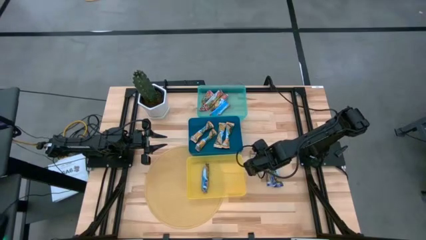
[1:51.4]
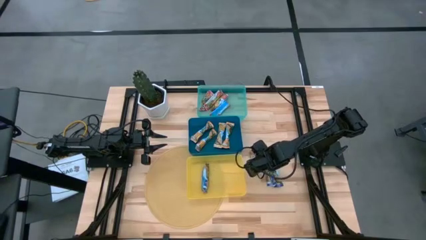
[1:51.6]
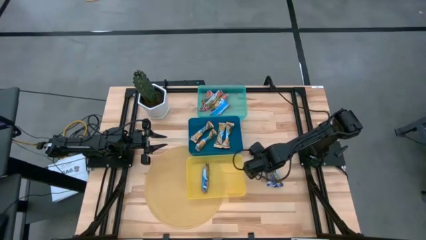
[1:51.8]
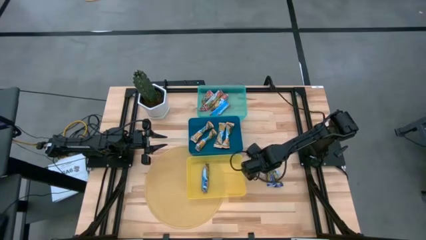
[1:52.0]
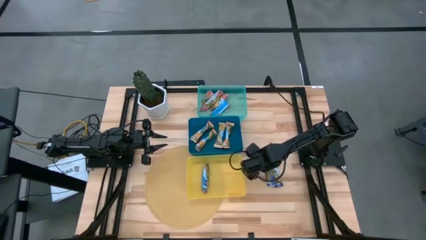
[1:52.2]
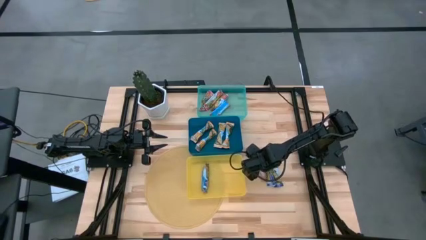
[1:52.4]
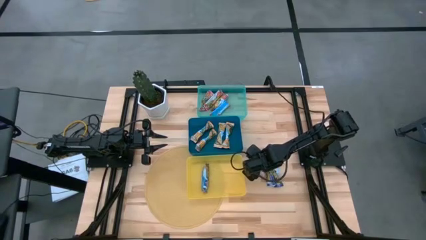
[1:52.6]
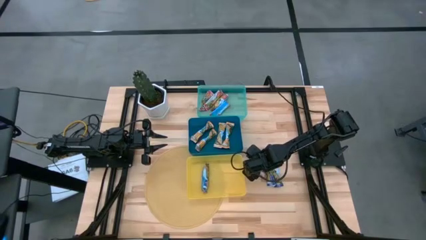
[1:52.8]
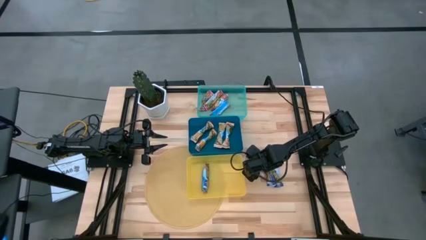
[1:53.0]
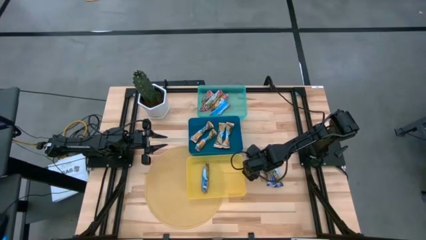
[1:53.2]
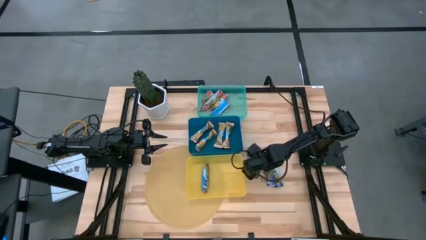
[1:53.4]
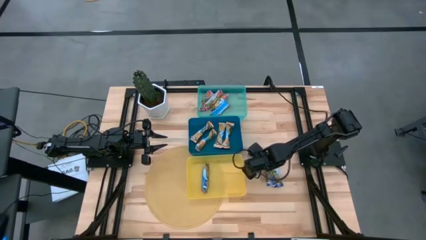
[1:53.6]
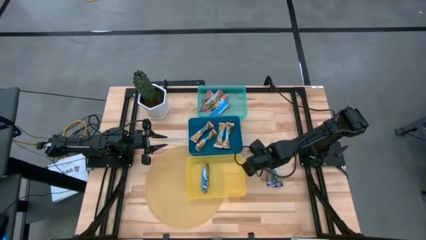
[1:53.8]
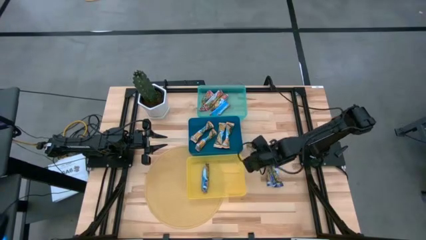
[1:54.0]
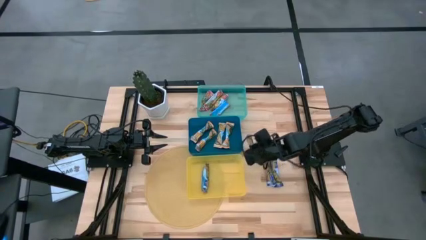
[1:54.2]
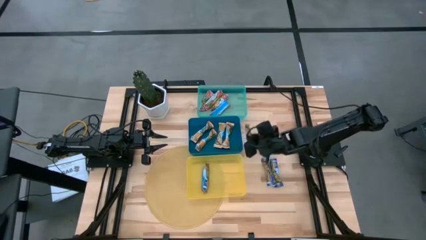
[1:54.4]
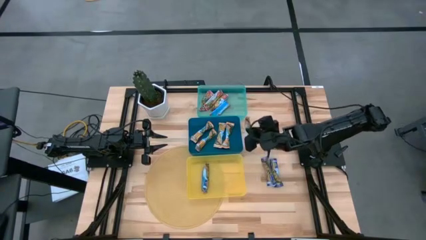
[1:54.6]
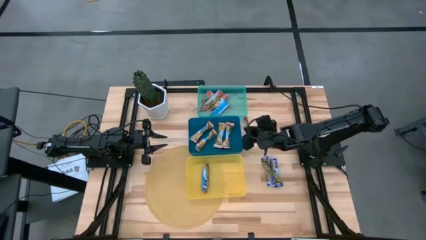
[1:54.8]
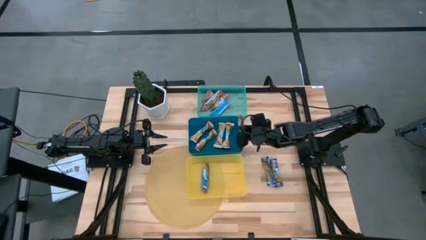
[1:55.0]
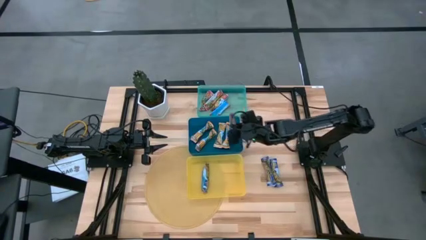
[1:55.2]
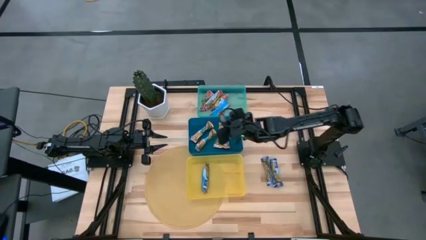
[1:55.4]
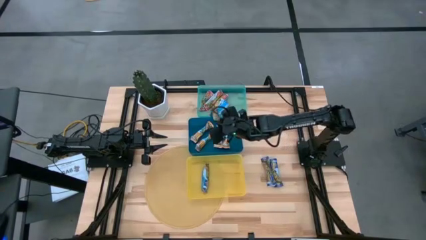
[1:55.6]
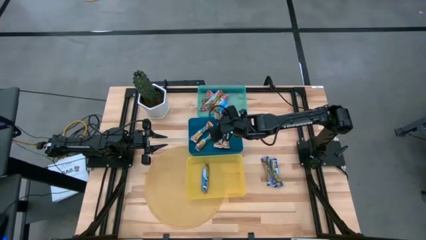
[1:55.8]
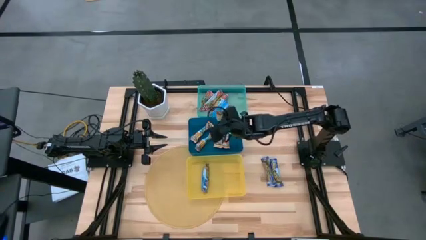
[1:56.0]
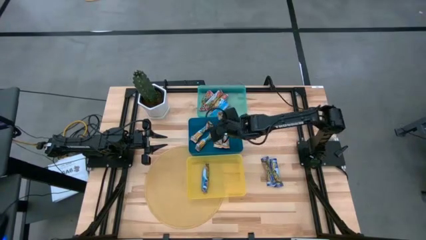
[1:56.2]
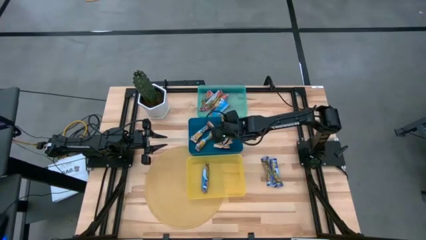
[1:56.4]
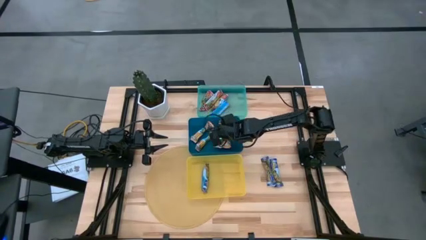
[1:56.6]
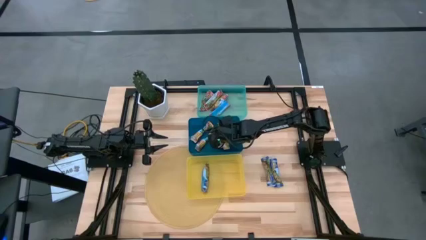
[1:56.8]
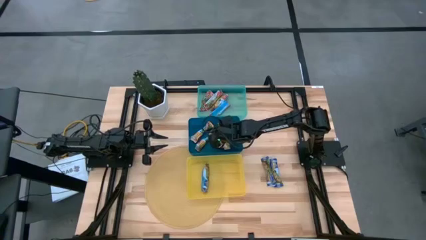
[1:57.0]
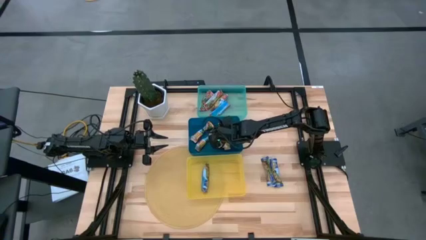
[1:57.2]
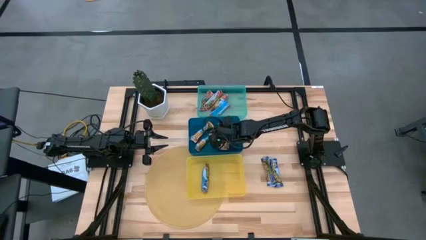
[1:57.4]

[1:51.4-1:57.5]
Task: Pick and place Granola Bars by type
Put the yellow granola bar into the blue bin

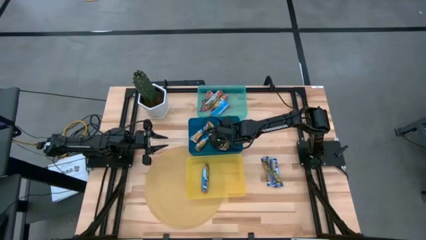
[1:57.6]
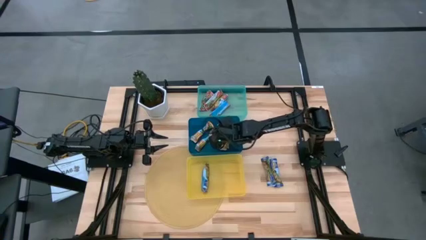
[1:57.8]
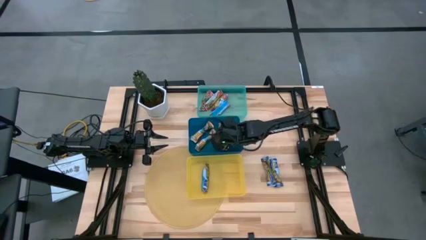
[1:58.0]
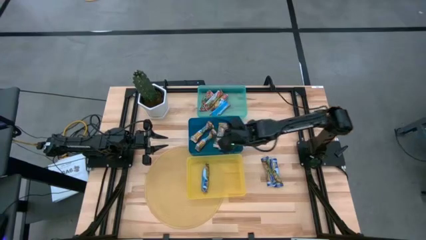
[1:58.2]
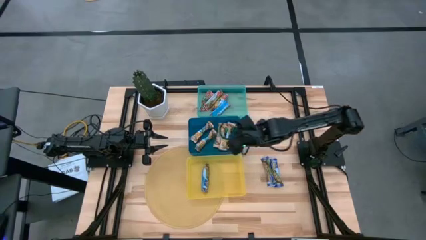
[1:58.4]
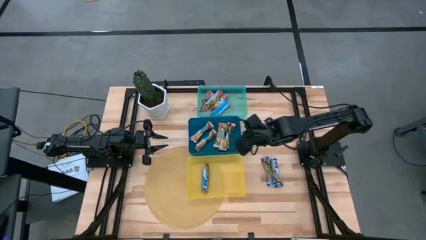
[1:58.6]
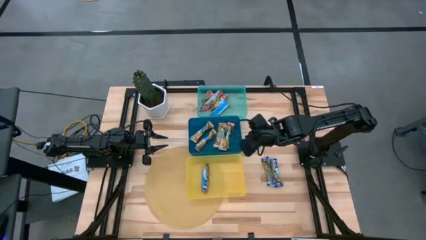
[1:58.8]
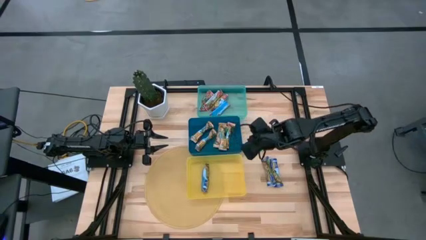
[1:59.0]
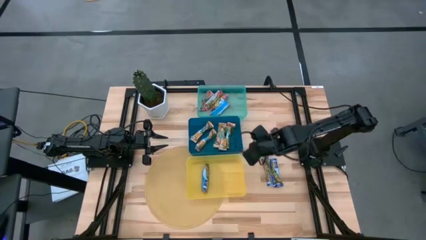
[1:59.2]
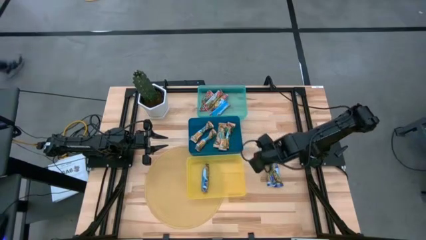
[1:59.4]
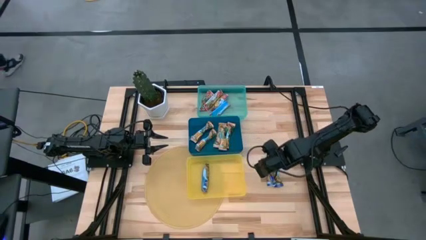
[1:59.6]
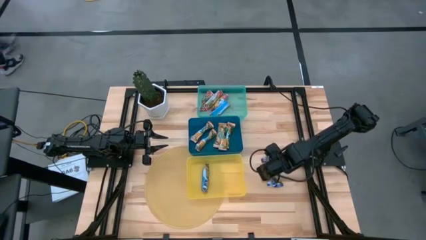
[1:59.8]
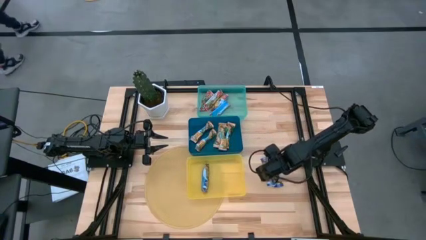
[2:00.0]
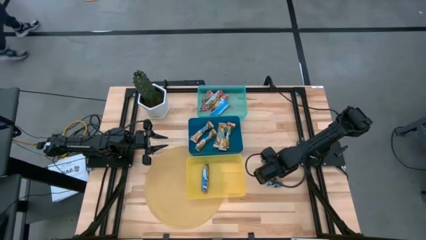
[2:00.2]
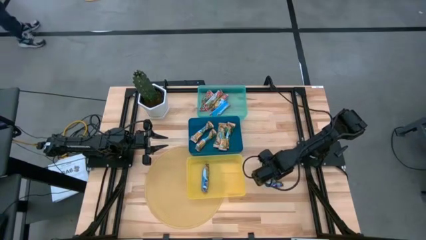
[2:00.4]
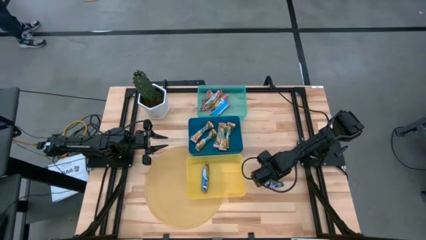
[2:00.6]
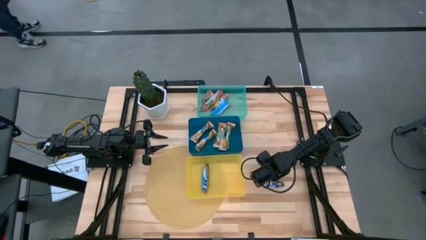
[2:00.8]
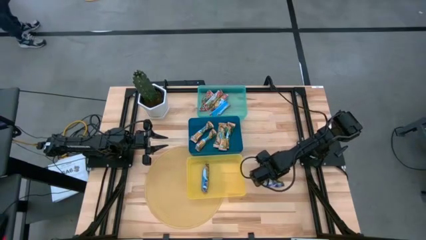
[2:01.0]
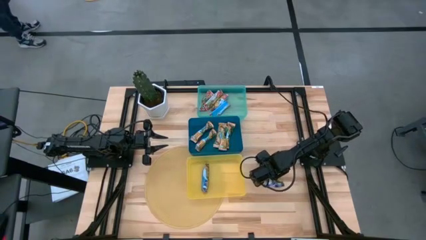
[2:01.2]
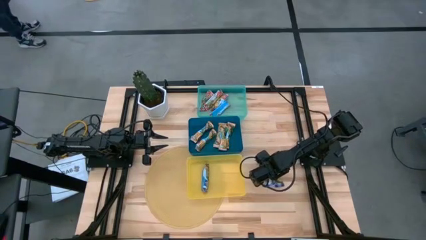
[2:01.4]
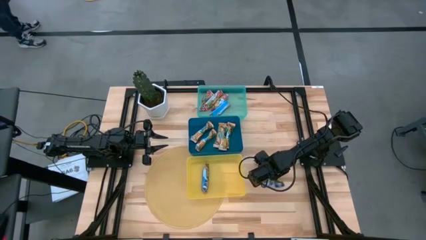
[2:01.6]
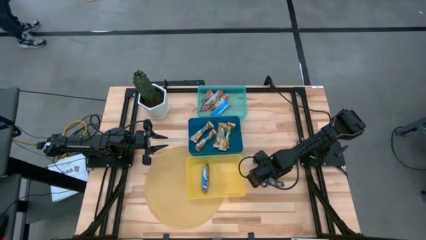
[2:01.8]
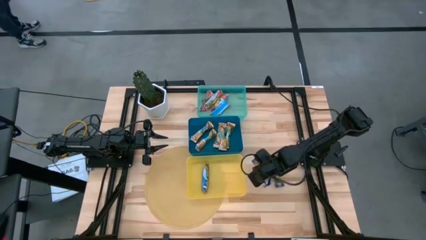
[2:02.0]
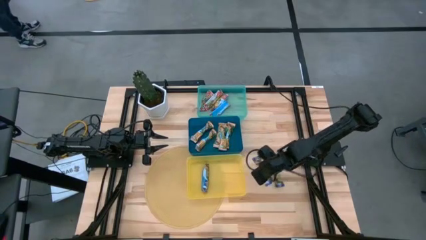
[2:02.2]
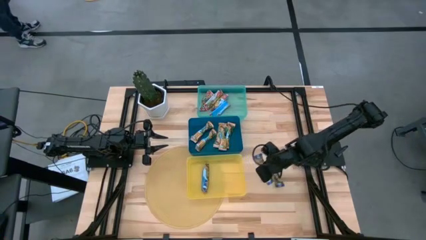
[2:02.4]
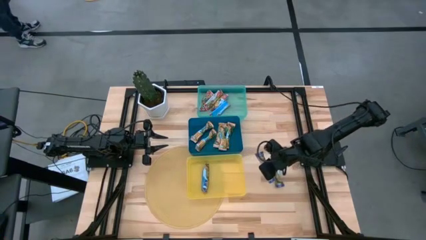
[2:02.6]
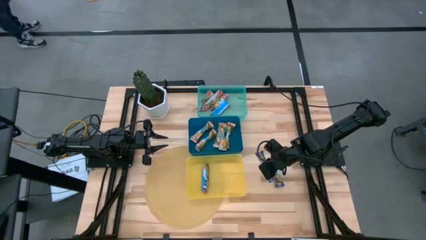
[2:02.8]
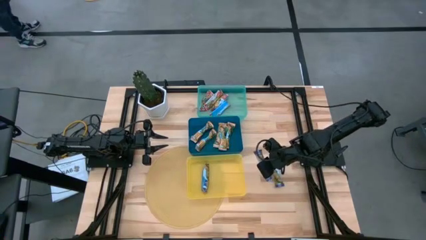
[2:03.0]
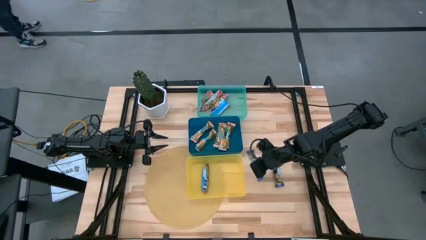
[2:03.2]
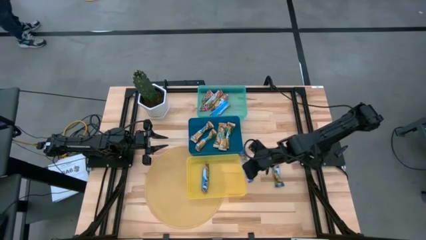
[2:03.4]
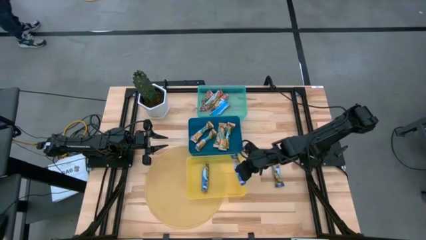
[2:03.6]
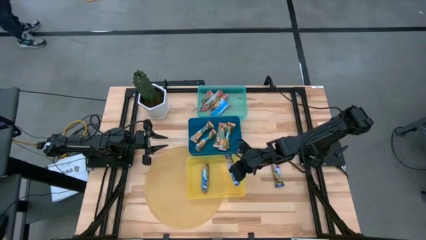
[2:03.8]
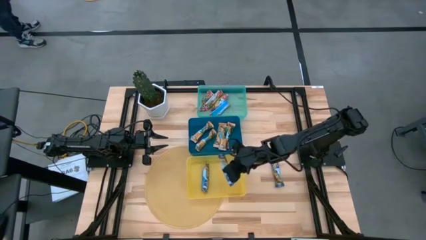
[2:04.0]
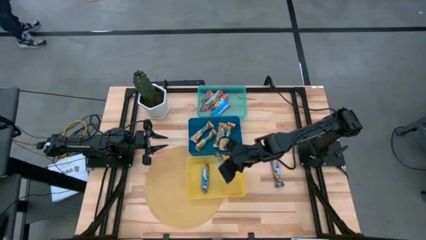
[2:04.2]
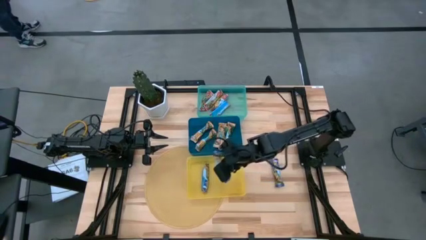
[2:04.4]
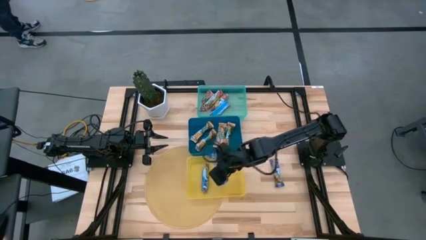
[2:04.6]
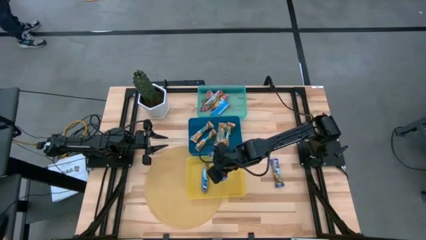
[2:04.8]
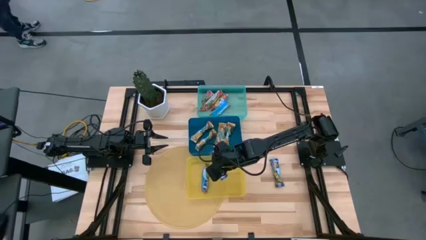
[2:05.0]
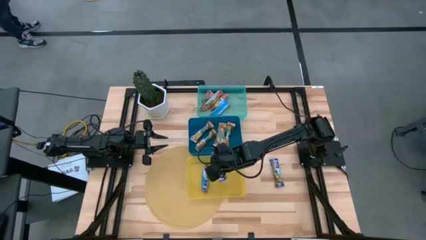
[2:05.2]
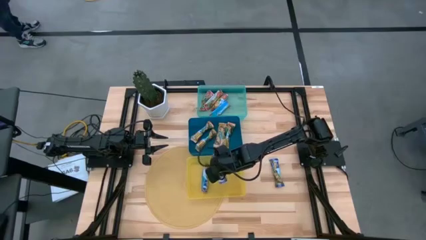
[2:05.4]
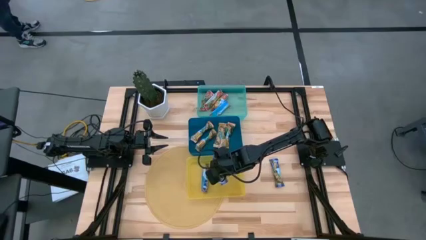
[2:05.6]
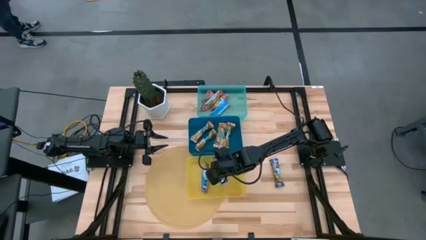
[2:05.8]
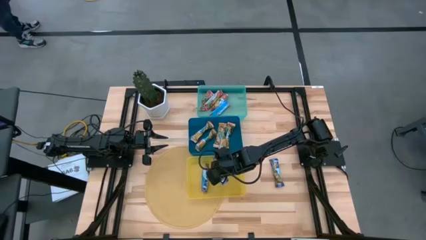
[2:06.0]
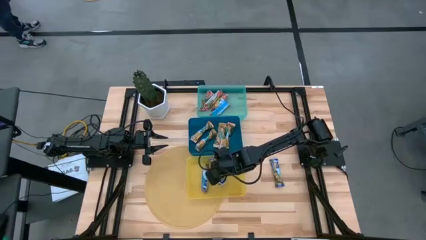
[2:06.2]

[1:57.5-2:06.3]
Put the blue granola bar into the yellow bin

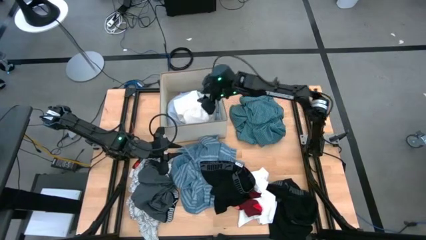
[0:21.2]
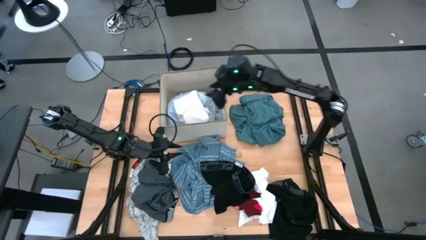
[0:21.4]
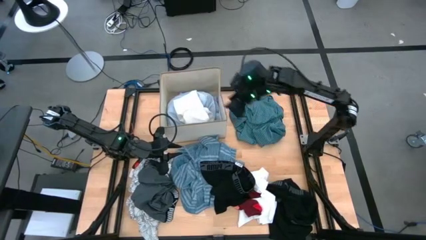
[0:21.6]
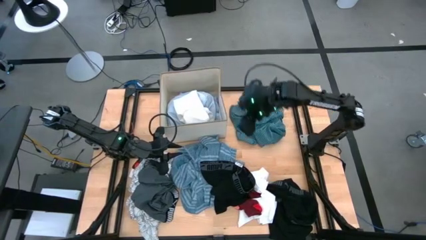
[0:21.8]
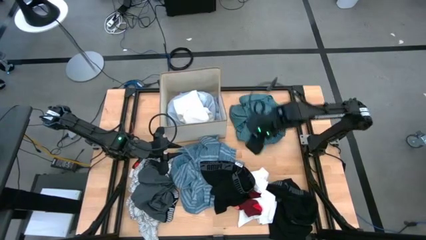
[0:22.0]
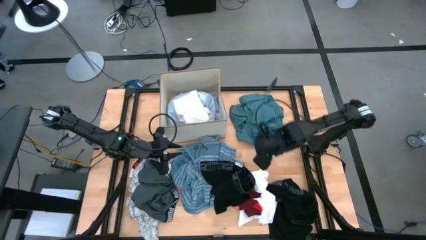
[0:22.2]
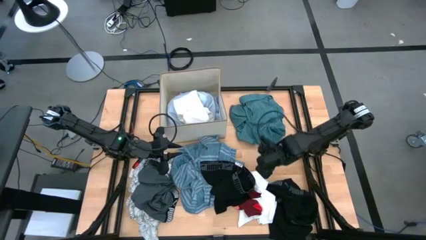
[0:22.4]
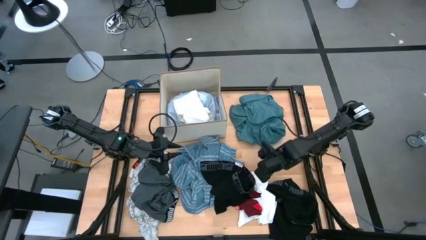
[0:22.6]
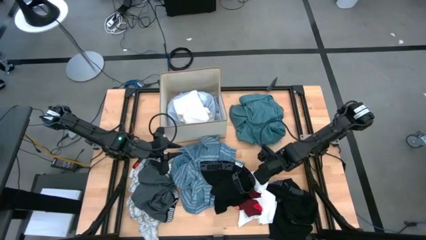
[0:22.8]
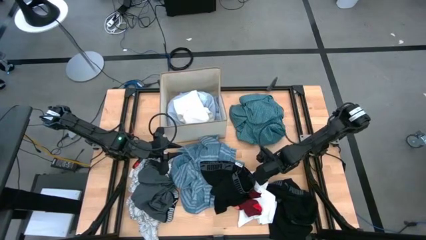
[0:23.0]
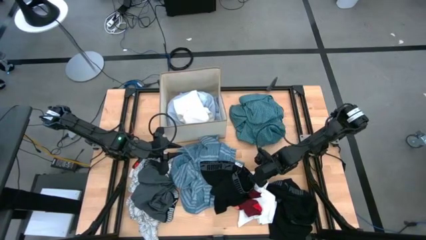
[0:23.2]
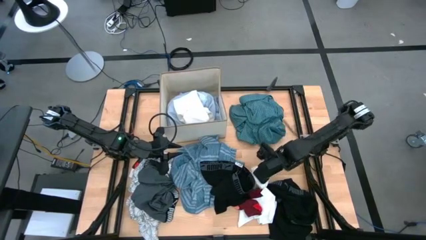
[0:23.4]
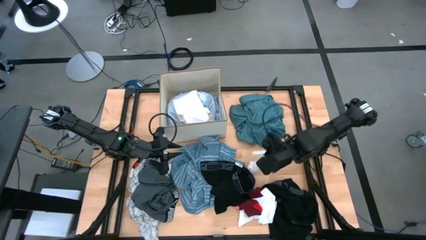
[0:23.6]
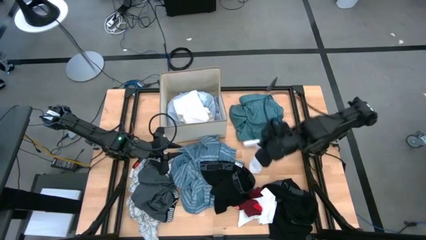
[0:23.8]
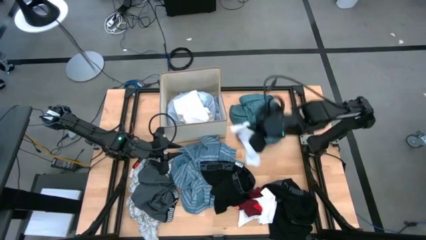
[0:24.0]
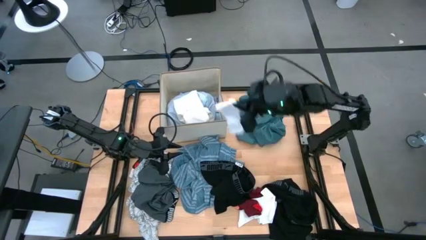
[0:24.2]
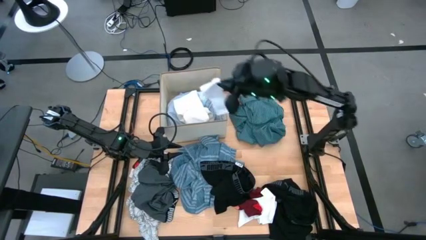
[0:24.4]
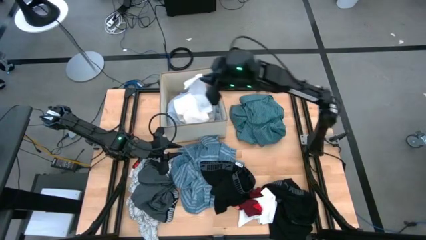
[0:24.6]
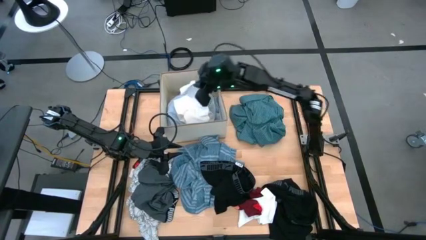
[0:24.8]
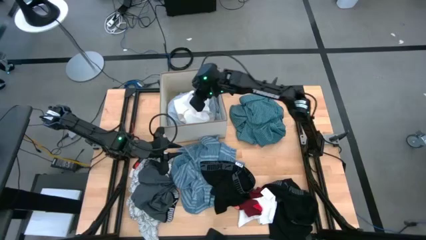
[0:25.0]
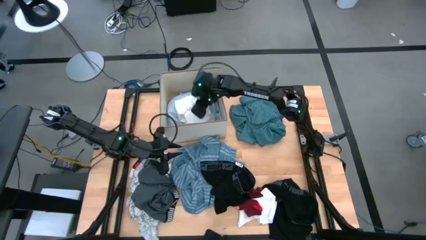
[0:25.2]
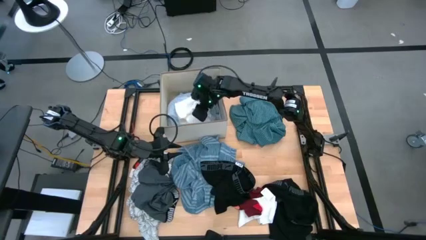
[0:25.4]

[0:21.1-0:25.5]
Task: Sort clothes
Put the white sock into the white laundry organizer
